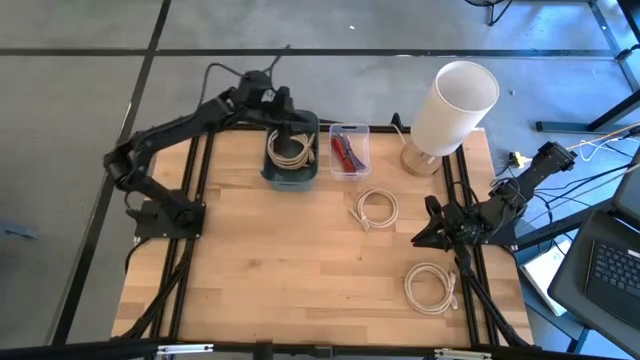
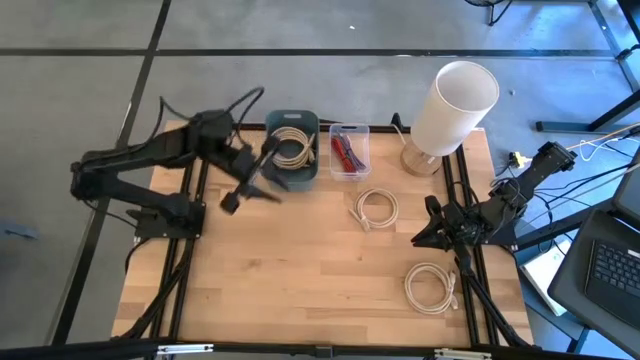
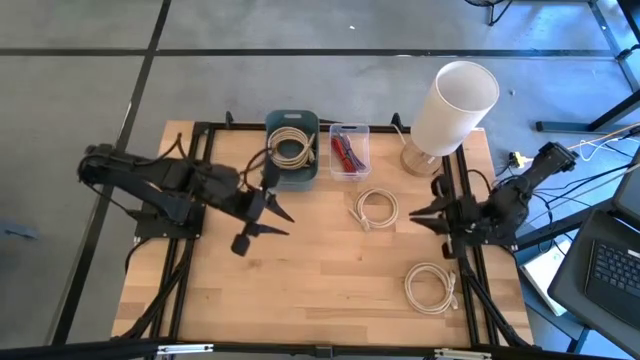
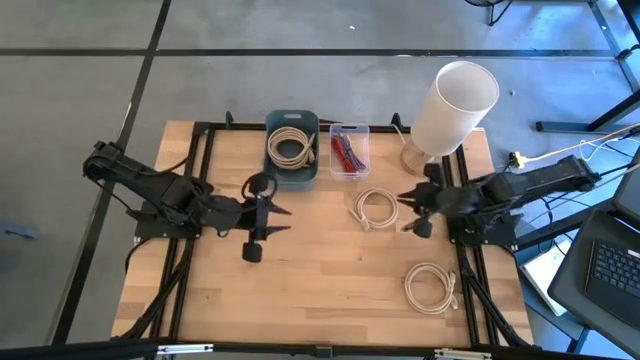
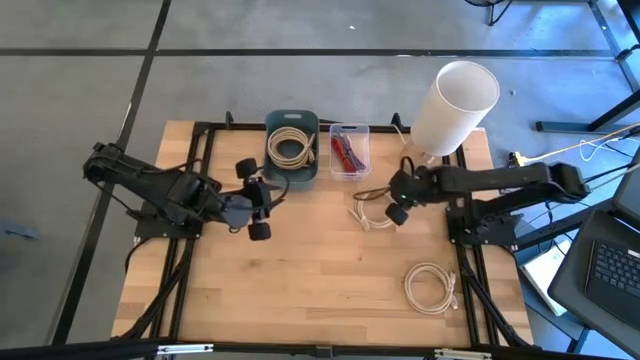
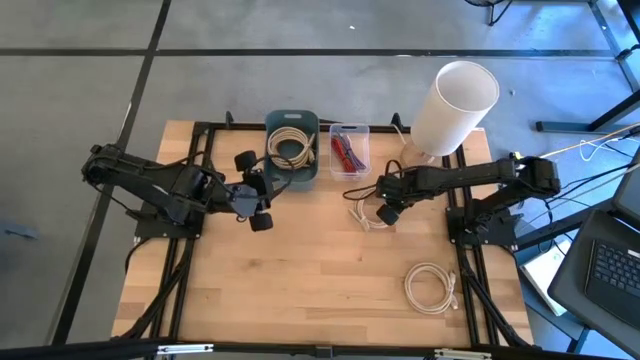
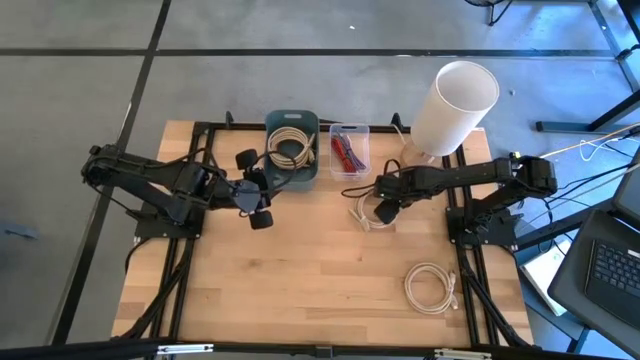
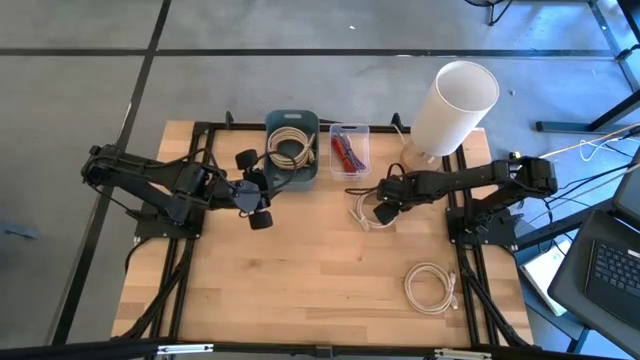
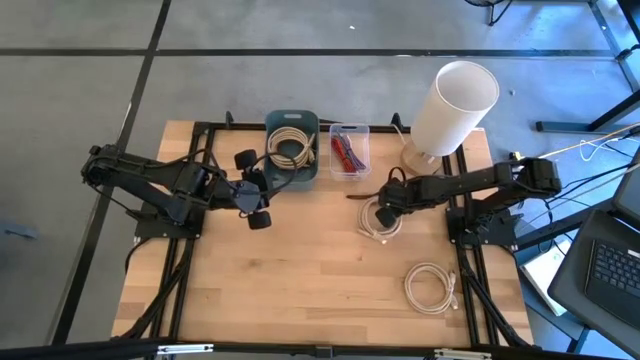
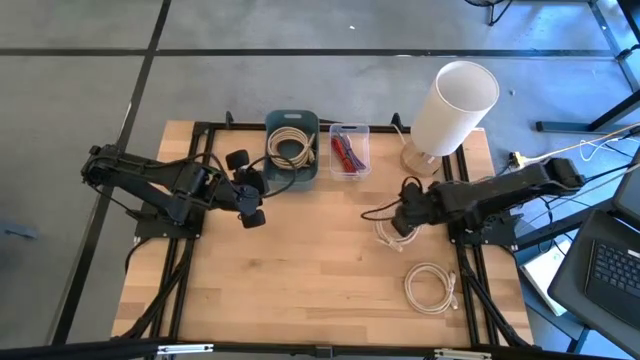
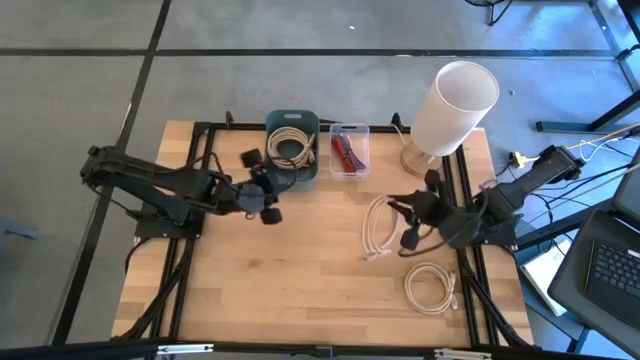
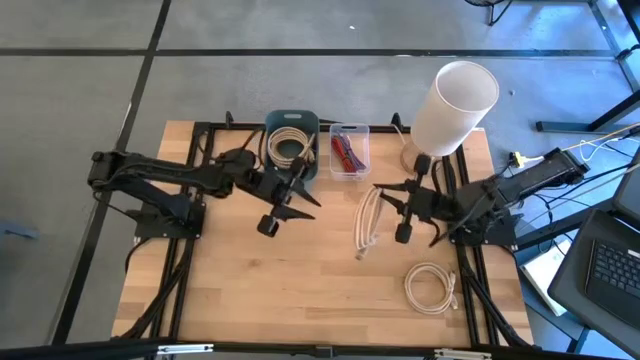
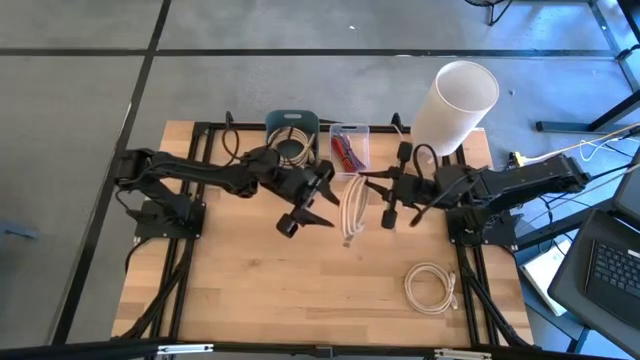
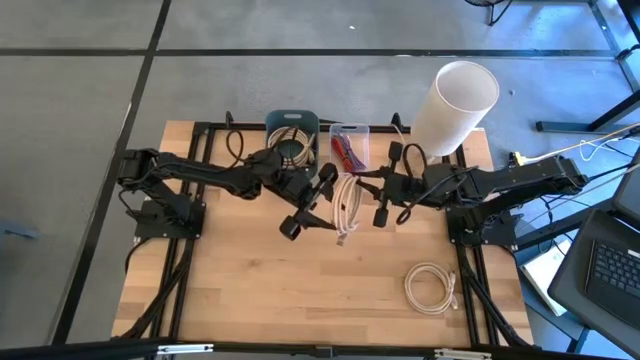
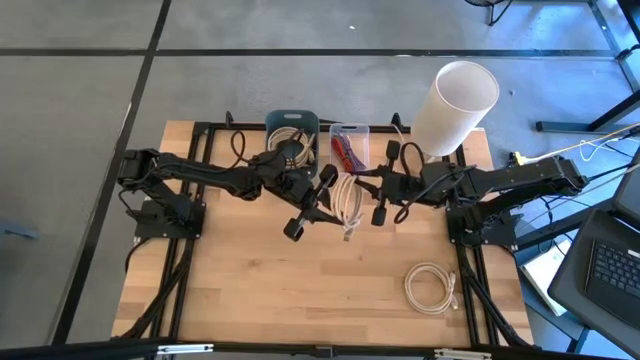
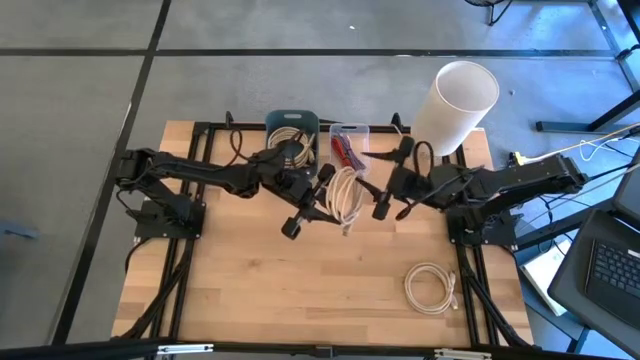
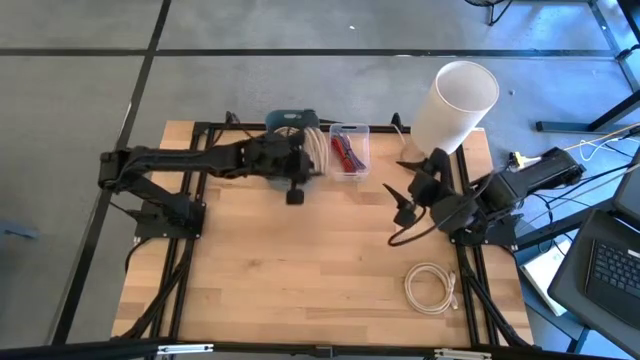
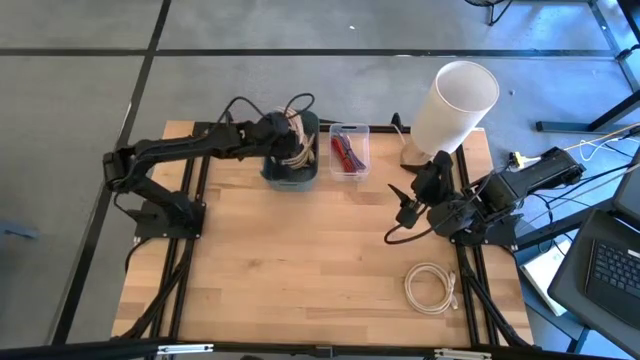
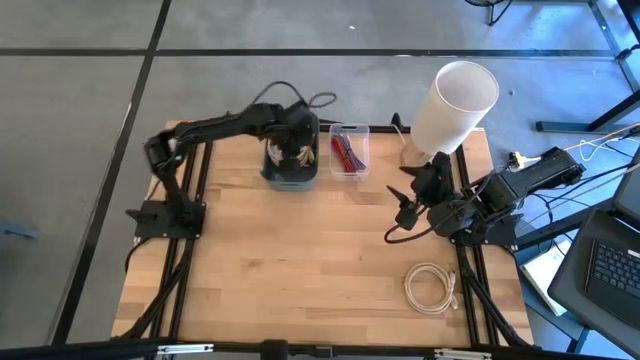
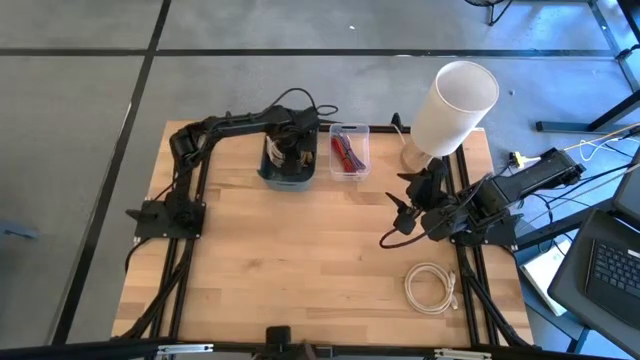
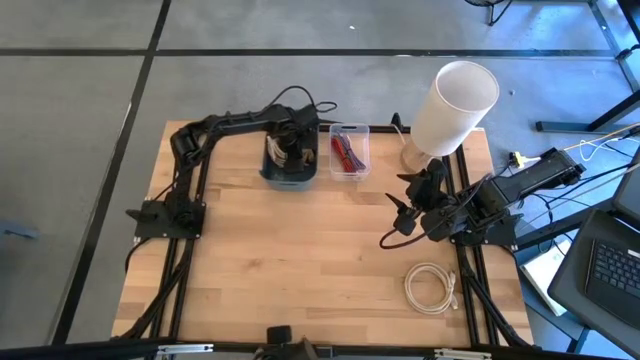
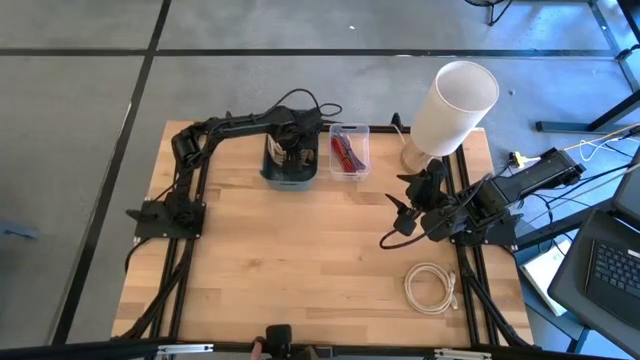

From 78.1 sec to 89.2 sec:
Put the white HDMI cable into the dark blue bin

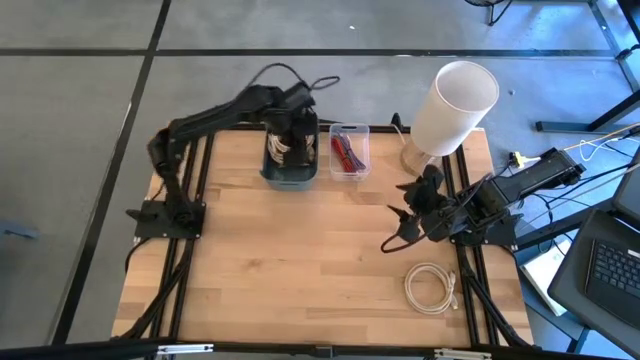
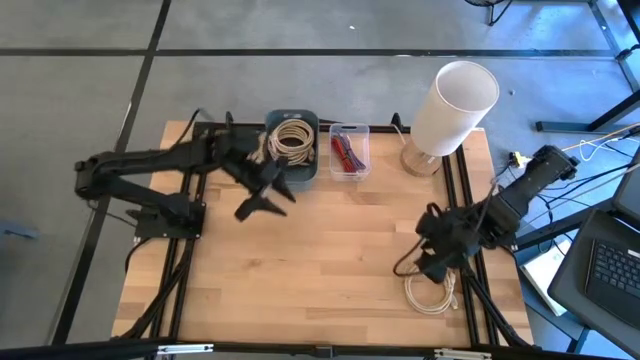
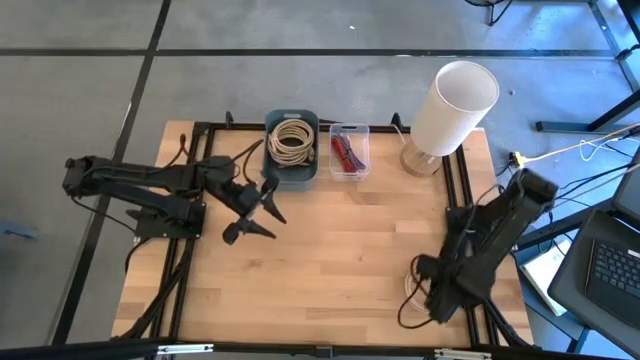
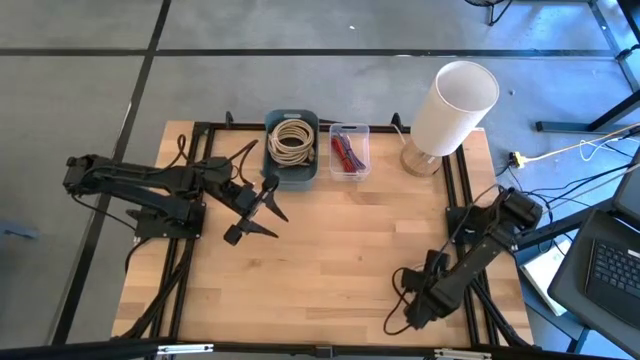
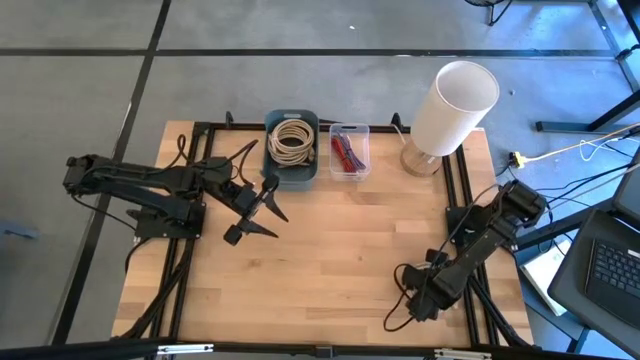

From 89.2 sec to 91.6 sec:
Put the white HDMI cable into the dark blue bin

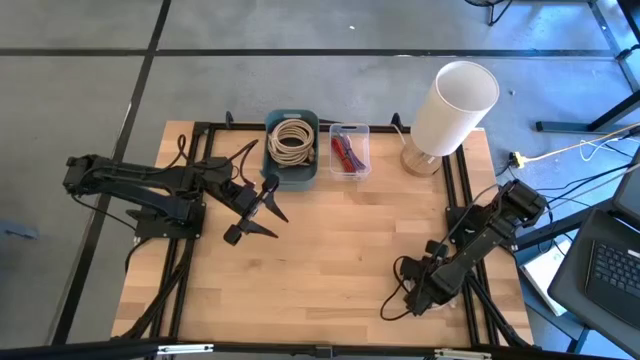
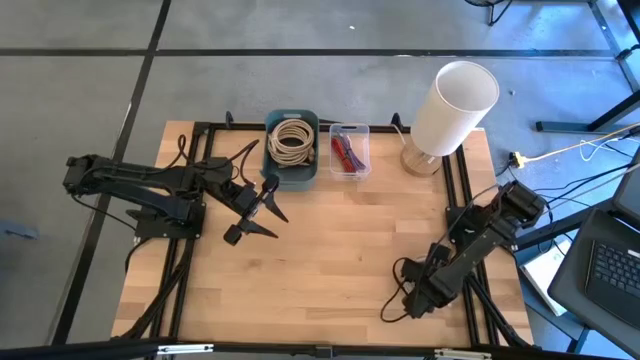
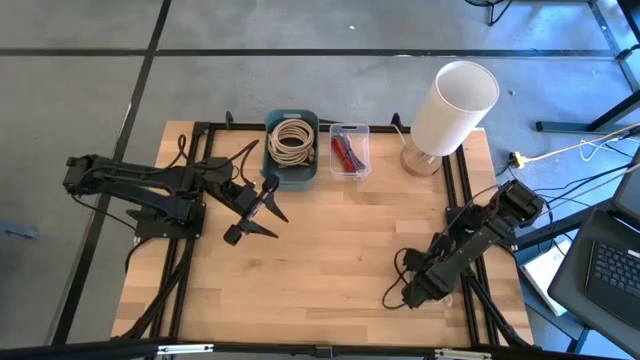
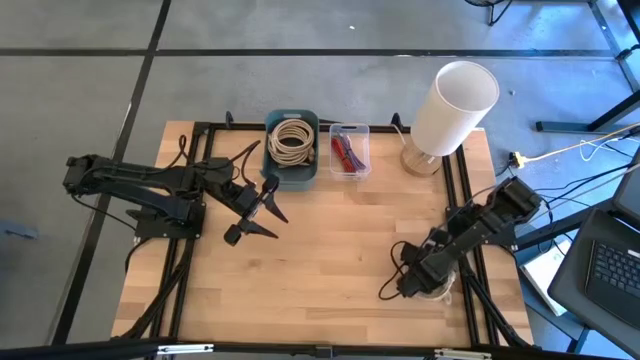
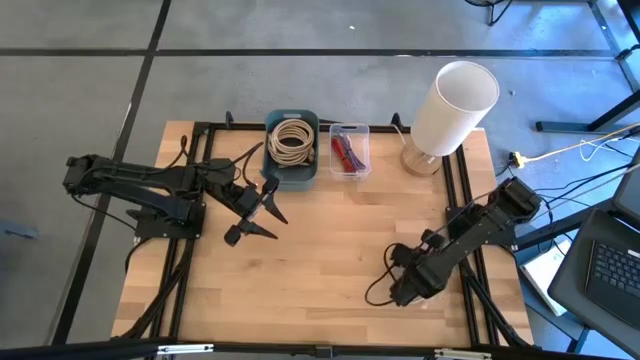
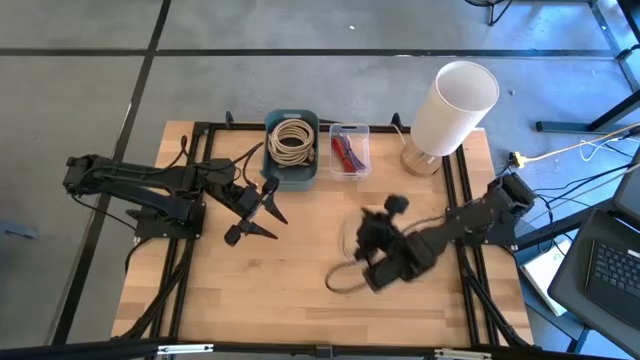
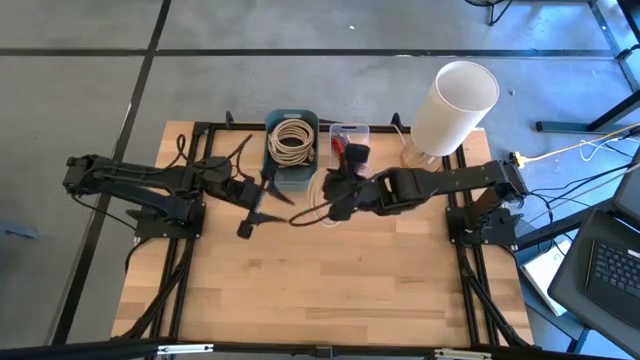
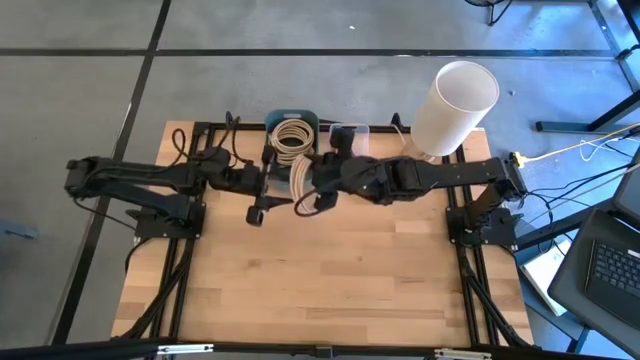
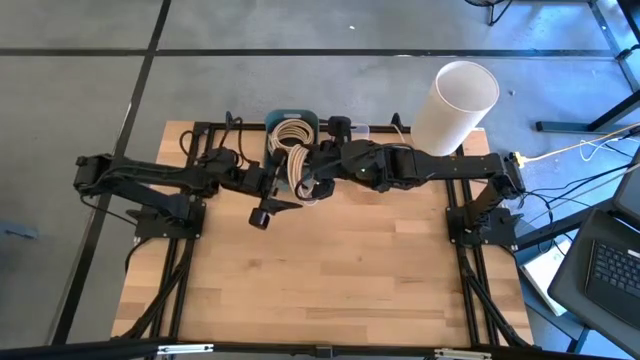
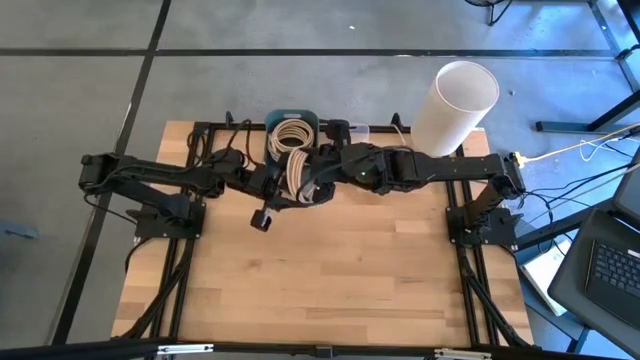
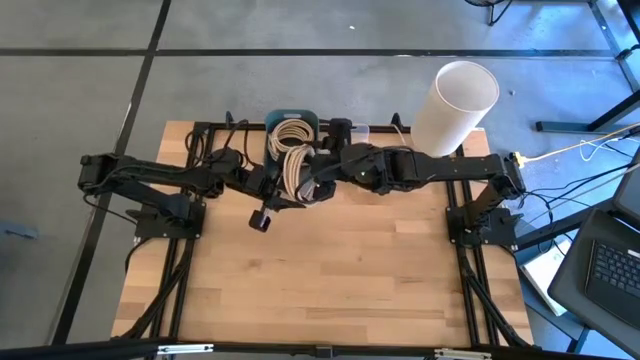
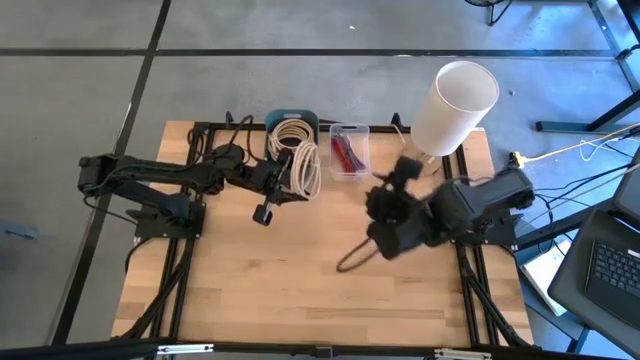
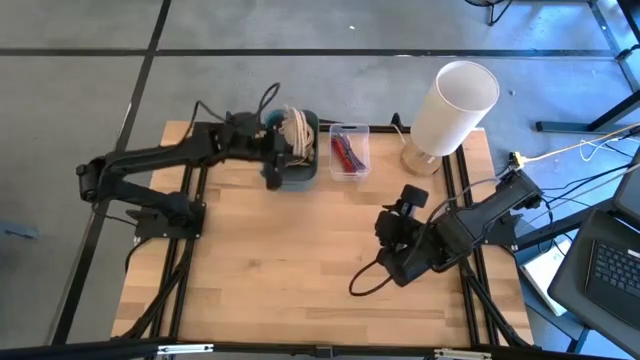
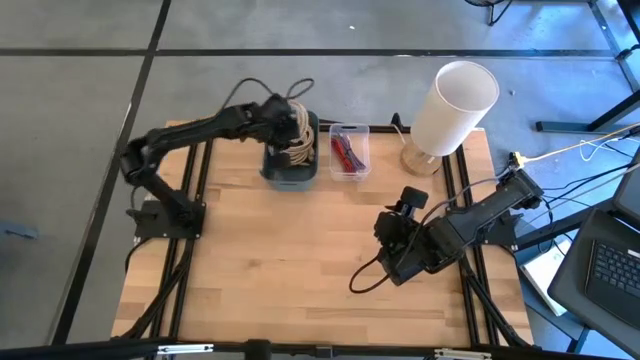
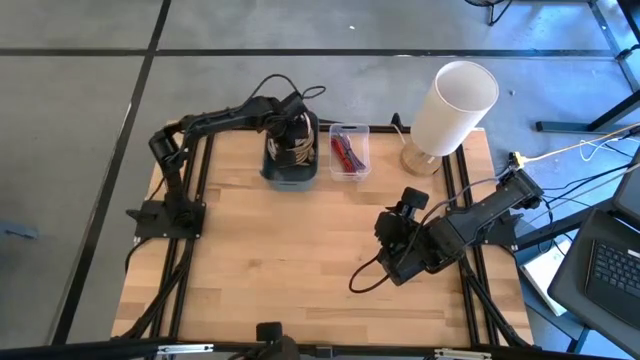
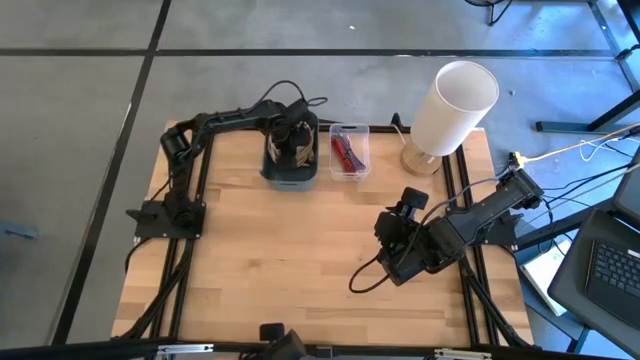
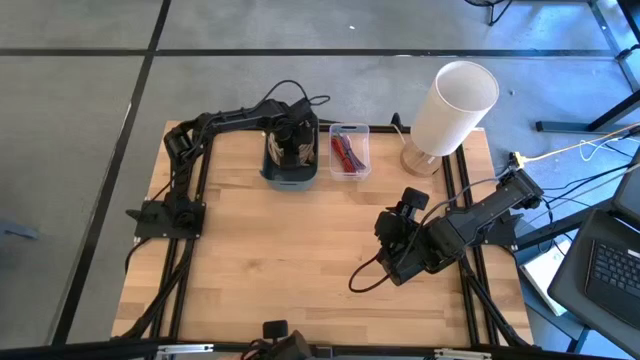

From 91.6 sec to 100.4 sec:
Put the white charger cable into the dark blue bin
